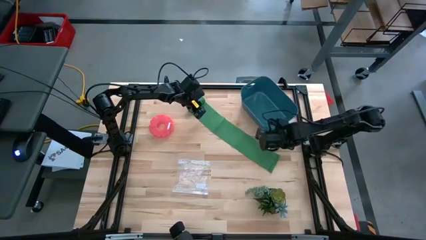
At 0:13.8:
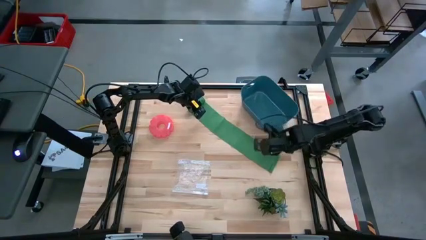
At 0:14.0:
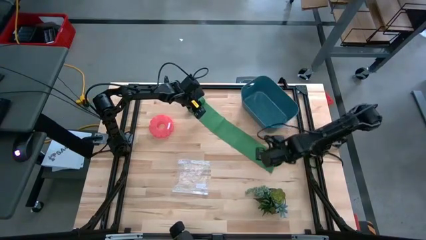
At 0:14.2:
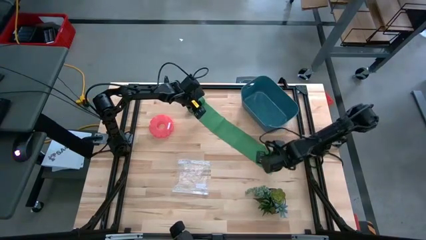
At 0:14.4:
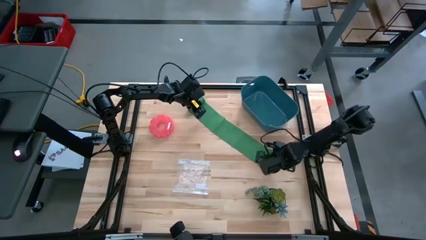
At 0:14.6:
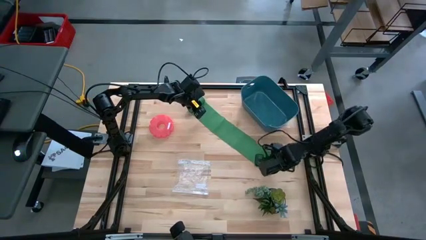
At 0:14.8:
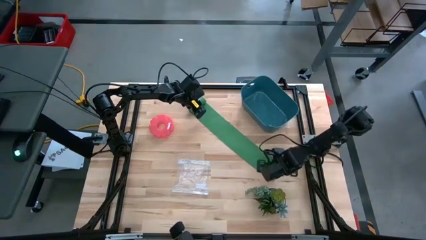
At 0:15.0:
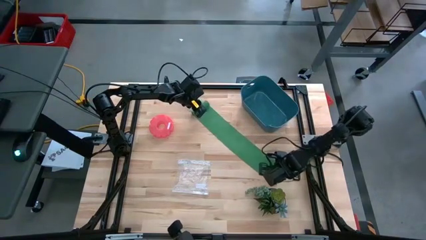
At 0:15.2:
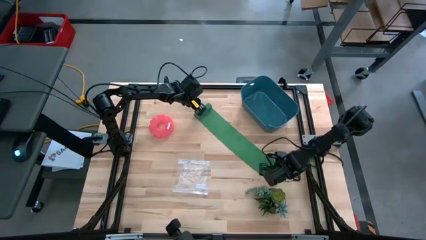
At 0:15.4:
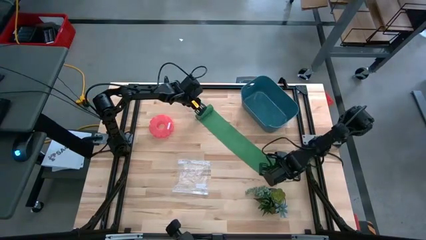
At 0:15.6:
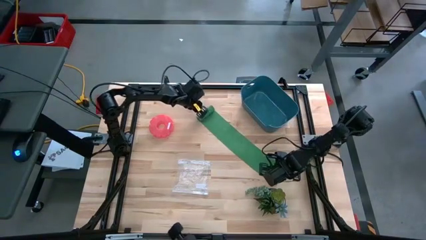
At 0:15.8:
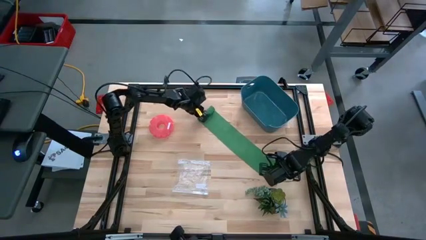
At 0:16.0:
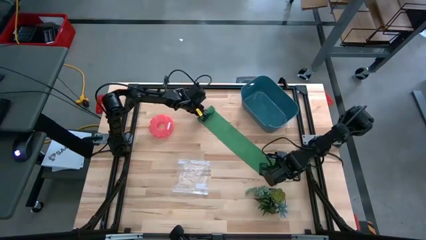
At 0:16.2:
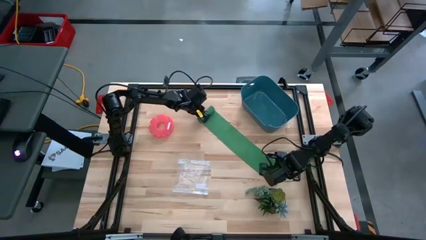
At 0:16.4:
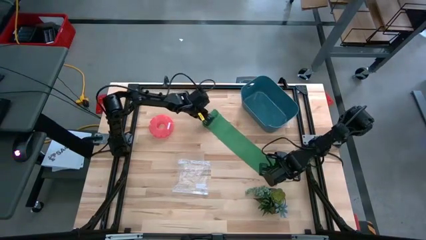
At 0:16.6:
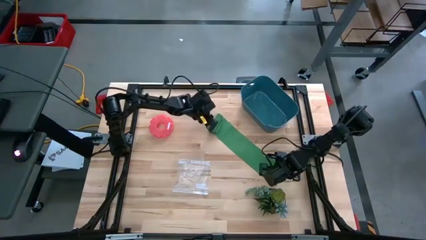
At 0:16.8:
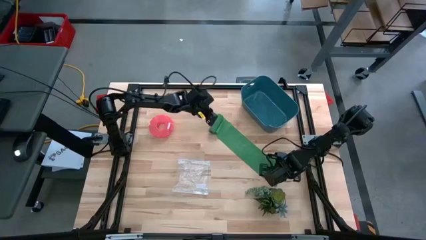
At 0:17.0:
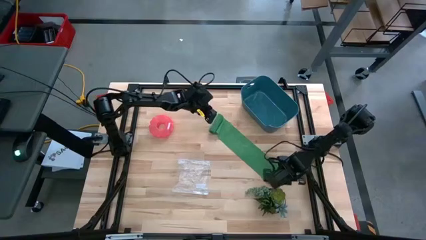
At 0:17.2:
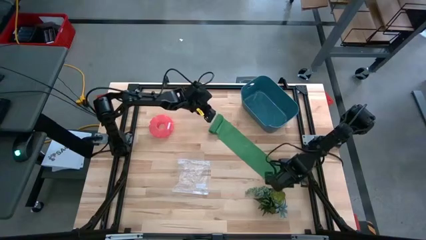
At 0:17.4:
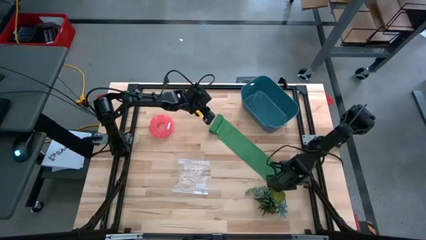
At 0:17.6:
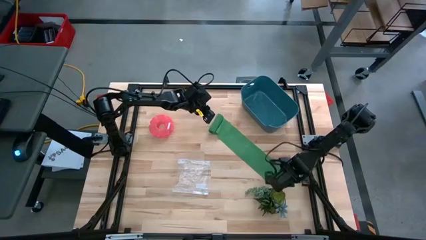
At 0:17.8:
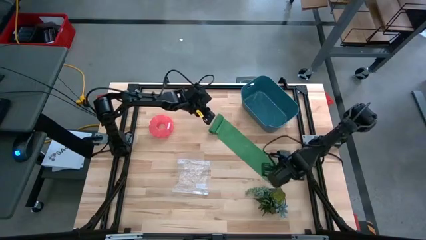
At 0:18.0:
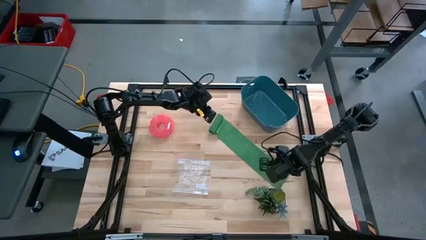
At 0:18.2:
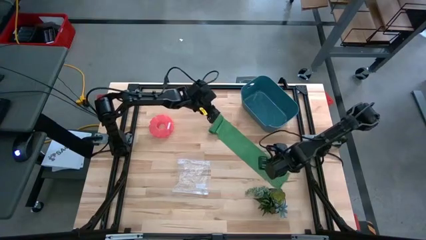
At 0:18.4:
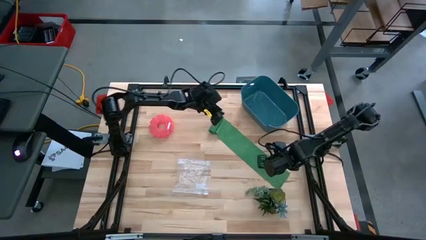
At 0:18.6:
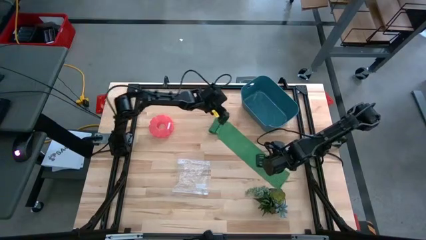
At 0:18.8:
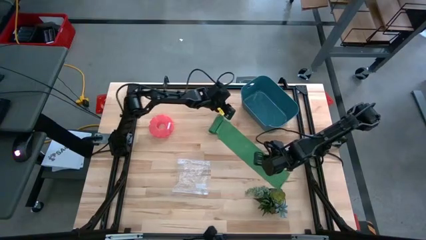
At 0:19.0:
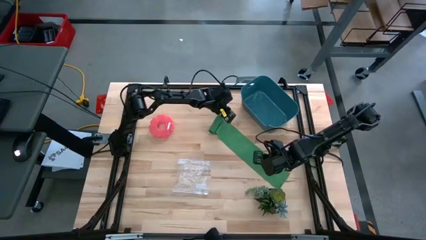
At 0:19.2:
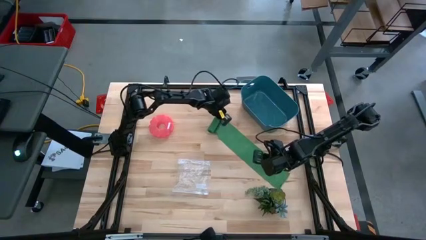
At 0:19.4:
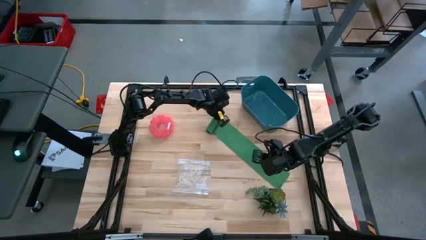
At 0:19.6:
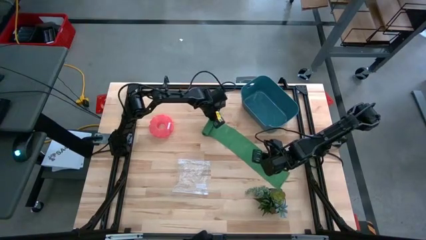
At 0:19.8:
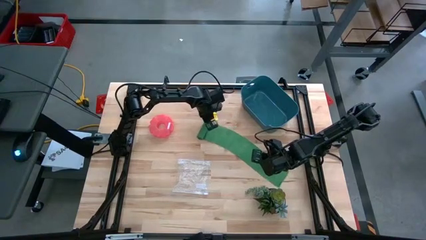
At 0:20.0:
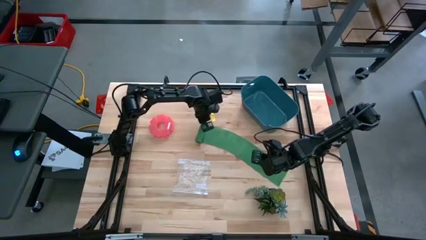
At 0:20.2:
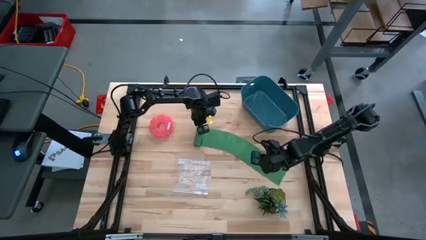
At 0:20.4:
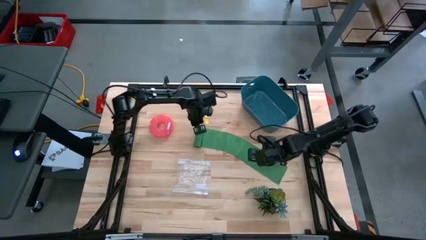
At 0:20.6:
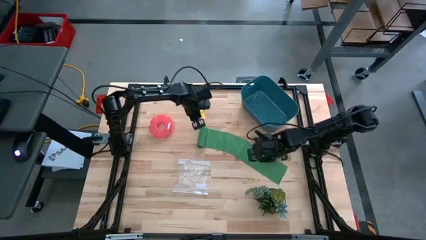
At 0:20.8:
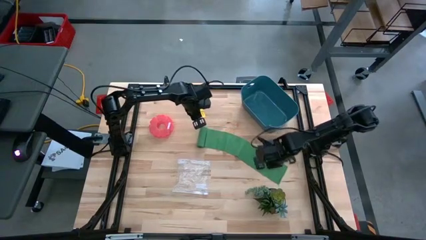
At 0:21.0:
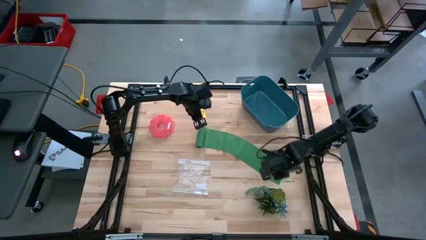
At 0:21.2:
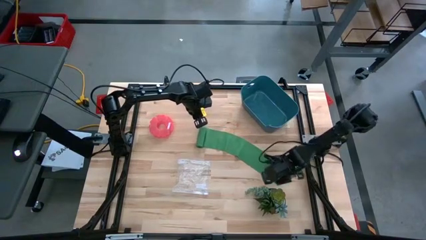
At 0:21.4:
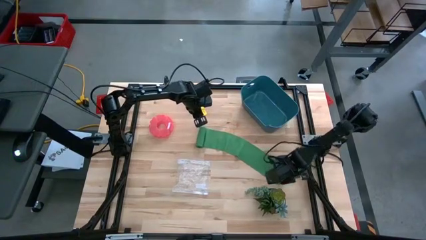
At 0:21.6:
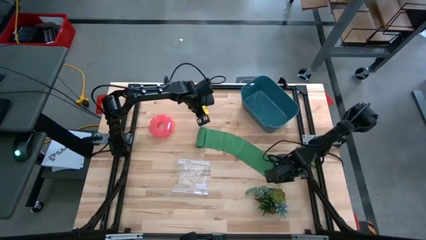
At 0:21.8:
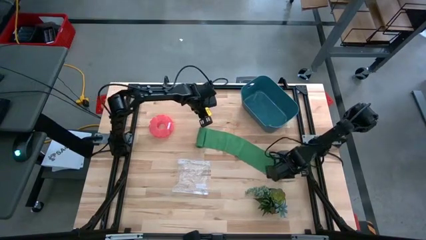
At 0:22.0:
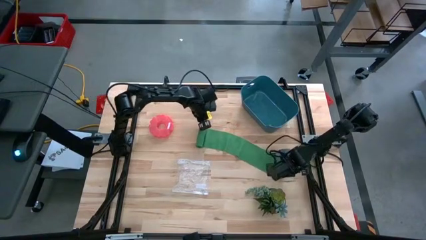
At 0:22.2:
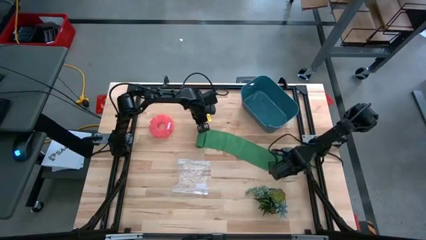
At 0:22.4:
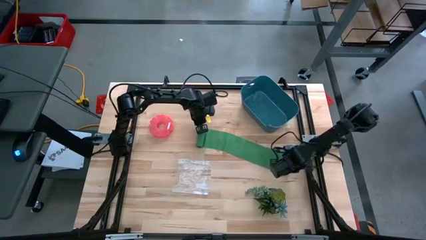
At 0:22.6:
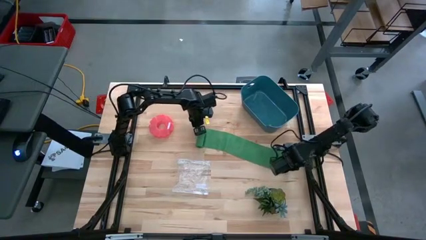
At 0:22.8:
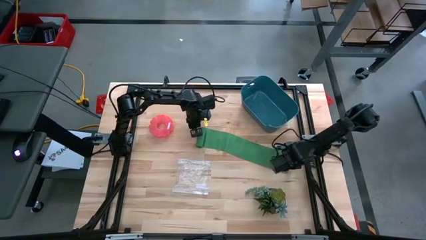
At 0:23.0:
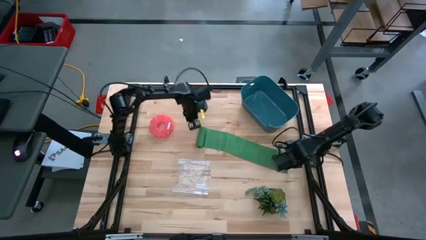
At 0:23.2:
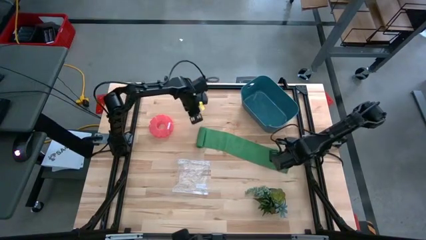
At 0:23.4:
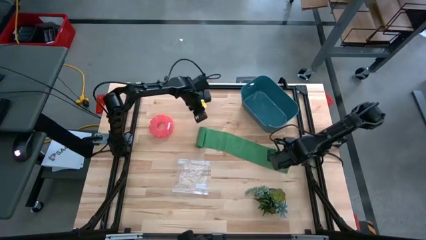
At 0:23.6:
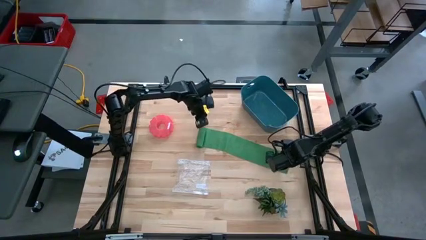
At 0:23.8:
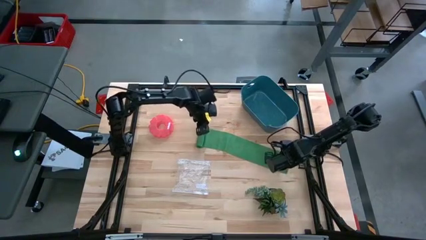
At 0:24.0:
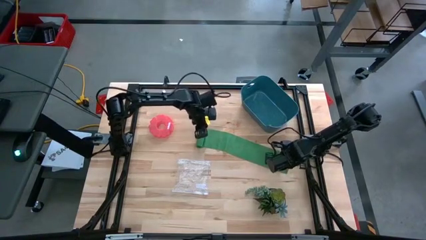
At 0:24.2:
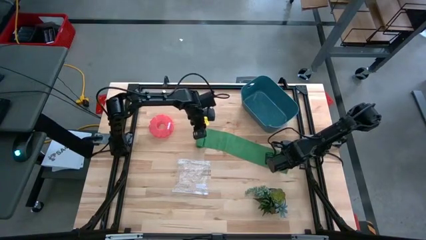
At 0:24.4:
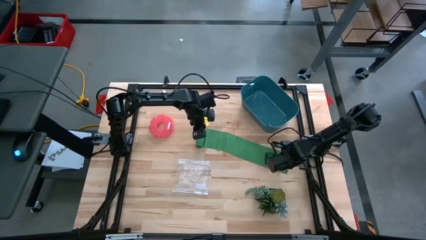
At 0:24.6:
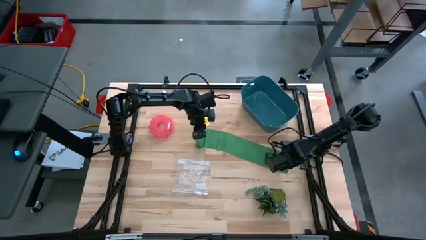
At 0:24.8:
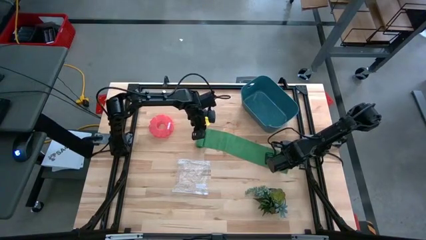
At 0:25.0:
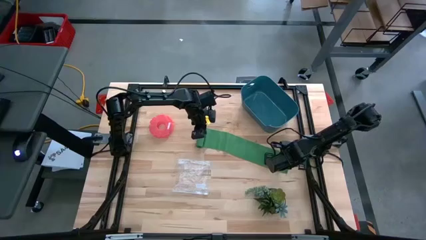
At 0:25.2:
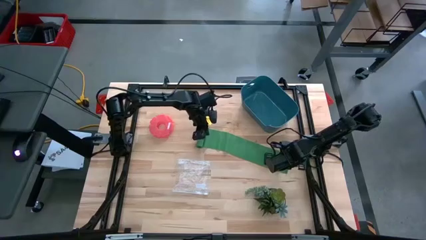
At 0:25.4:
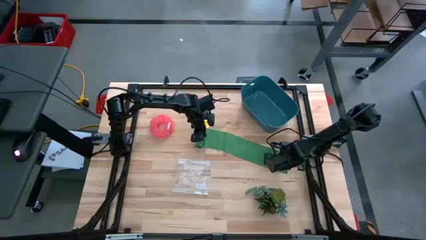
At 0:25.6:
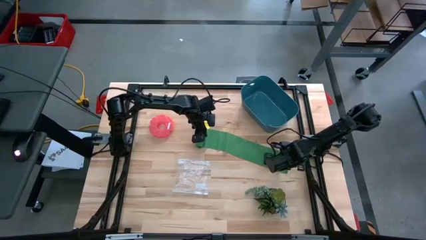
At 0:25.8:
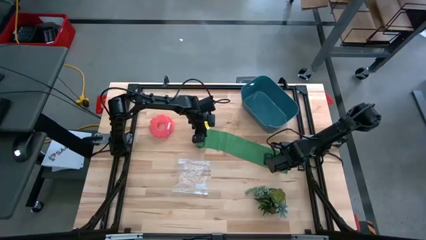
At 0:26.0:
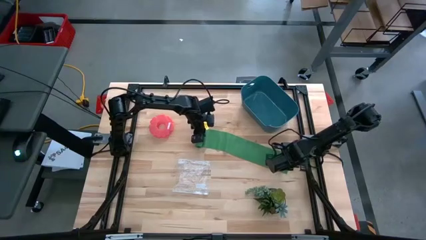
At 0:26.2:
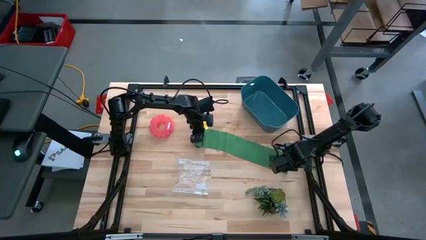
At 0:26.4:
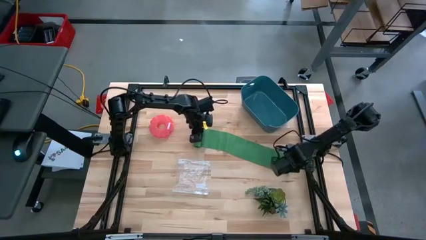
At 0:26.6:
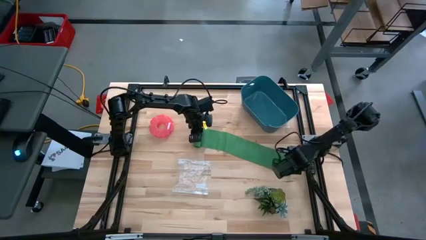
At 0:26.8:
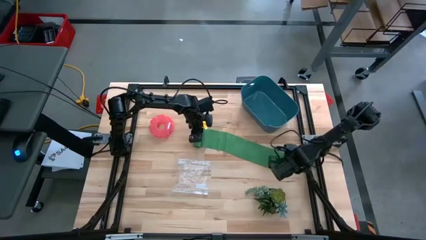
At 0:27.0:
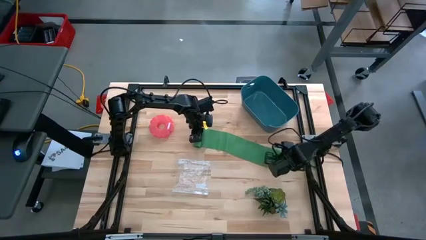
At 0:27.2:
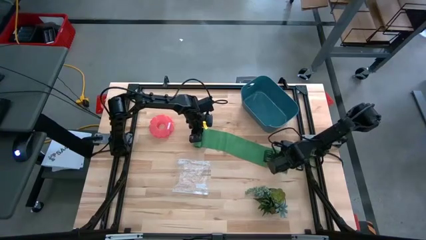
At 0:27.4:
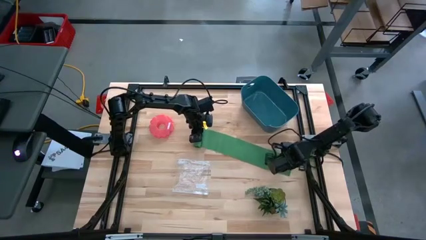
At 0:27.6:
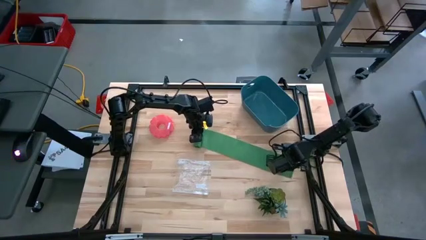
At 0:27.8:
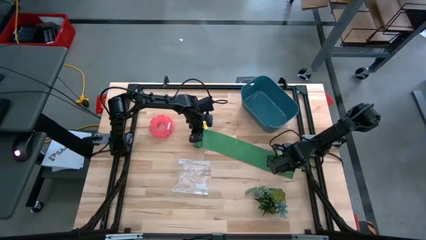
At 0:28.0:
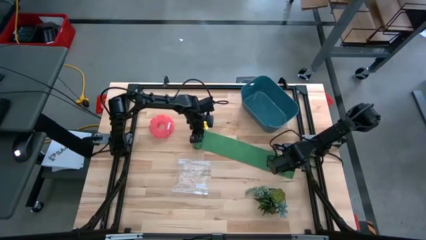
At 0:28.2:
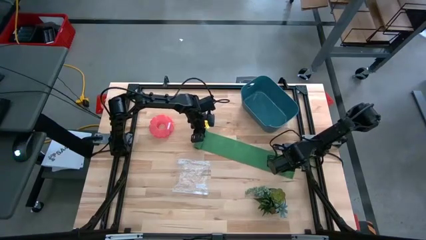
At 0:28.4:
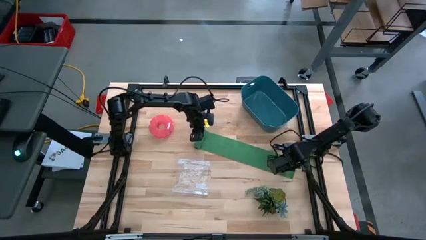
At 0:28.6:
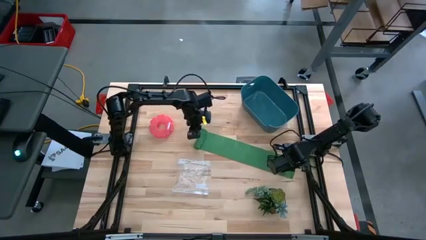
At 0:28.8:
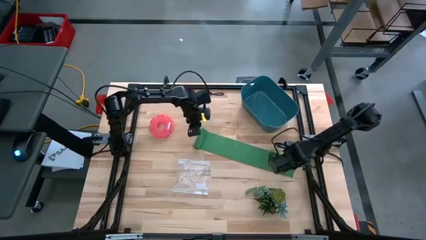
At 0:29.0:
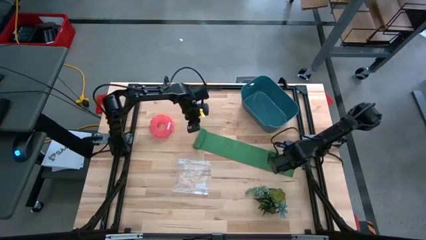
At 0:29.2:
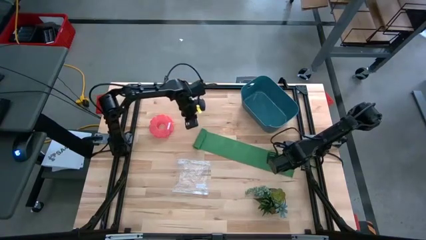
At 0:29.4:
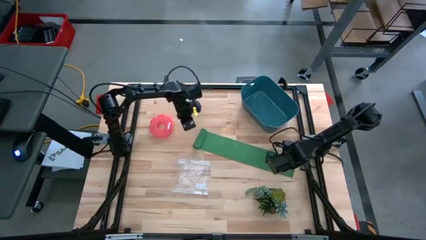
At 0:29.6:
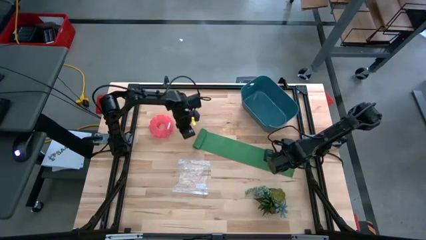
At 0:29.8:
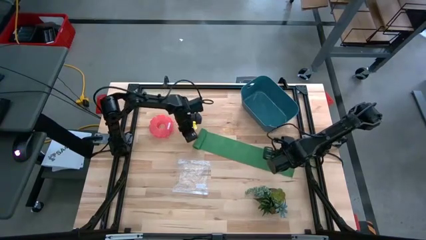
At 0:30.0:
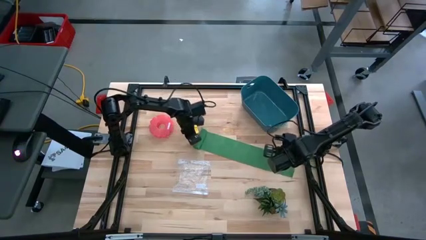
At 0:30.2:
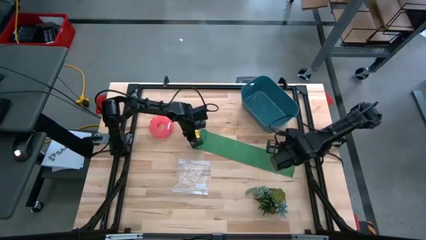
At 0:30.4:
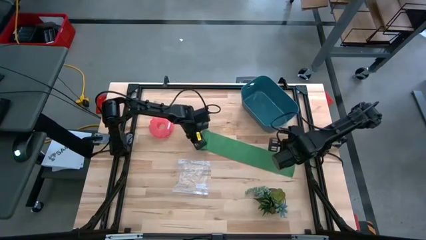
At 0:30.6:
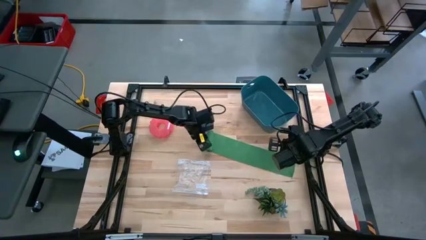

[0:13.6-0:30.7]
Task: Roll bandage
Roll the green bandage
